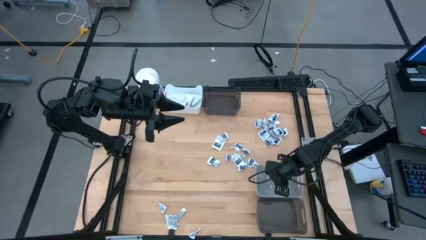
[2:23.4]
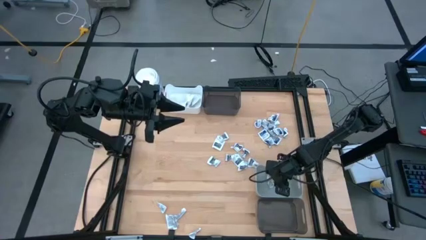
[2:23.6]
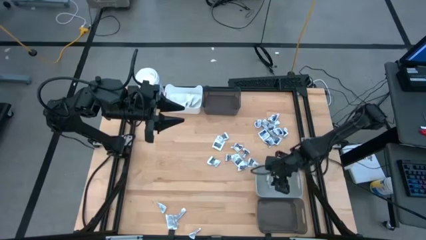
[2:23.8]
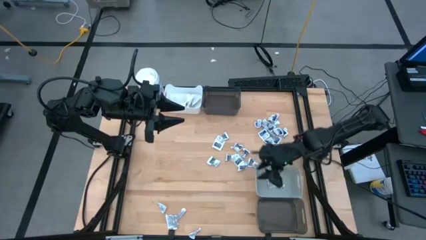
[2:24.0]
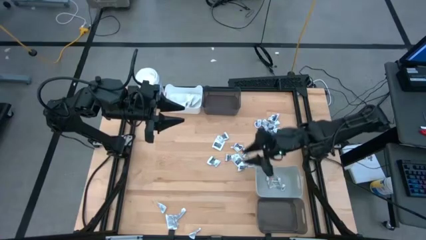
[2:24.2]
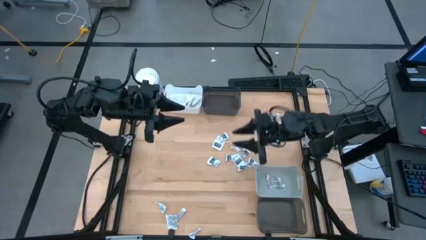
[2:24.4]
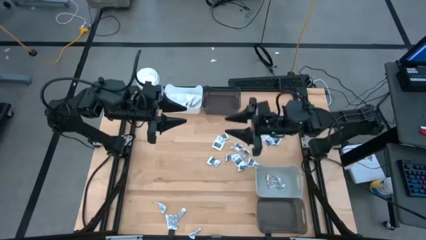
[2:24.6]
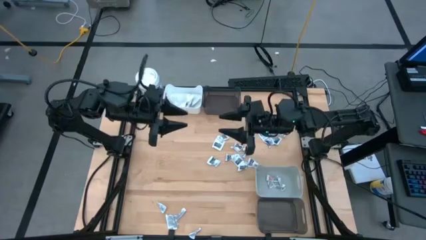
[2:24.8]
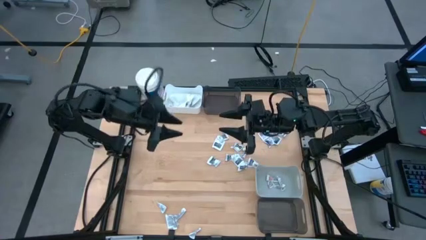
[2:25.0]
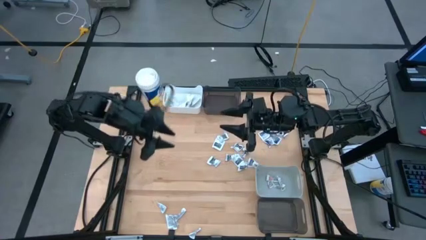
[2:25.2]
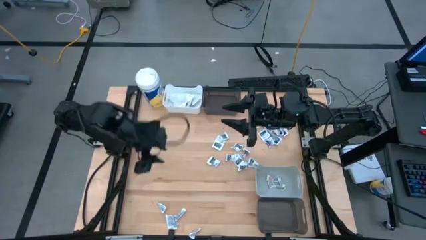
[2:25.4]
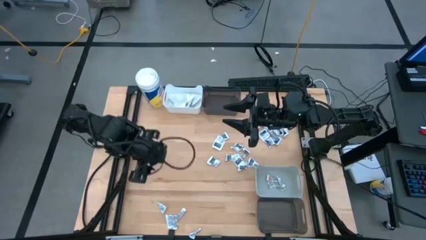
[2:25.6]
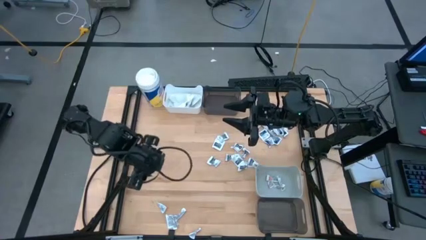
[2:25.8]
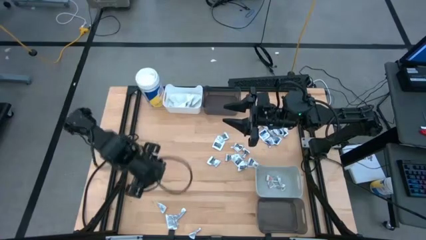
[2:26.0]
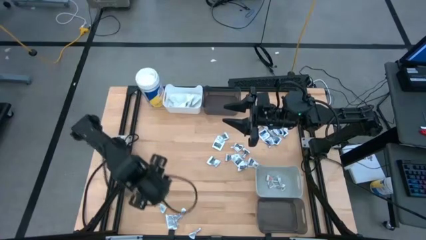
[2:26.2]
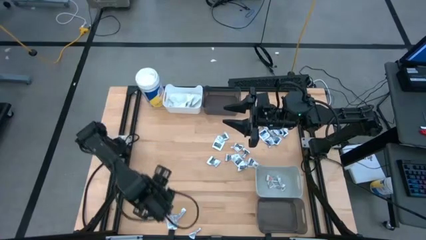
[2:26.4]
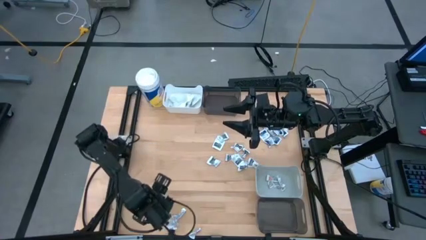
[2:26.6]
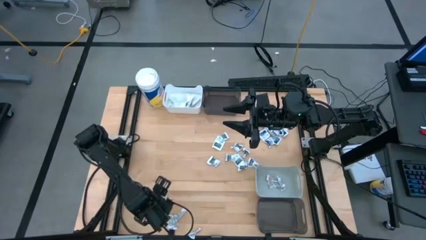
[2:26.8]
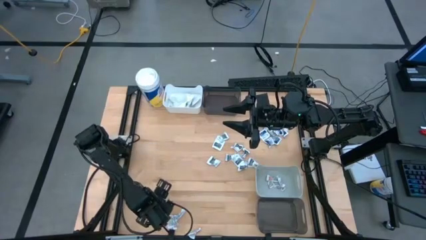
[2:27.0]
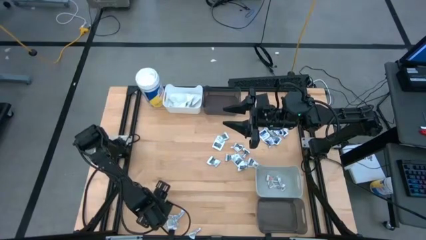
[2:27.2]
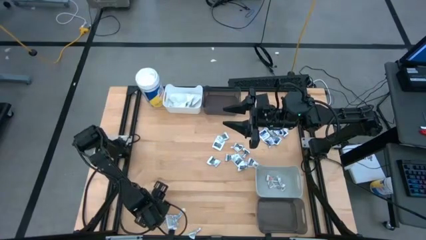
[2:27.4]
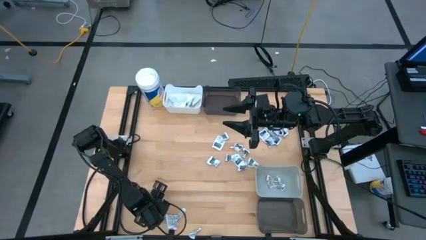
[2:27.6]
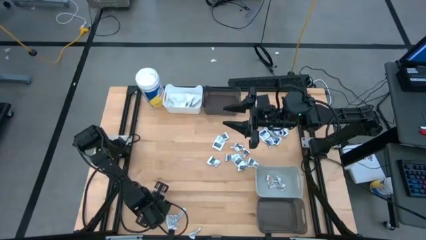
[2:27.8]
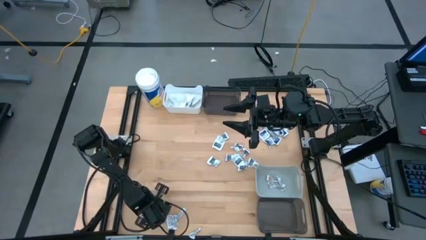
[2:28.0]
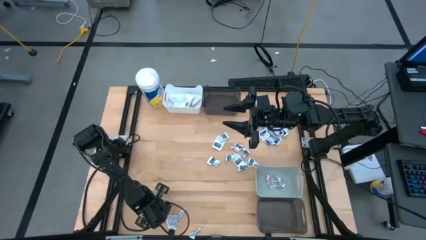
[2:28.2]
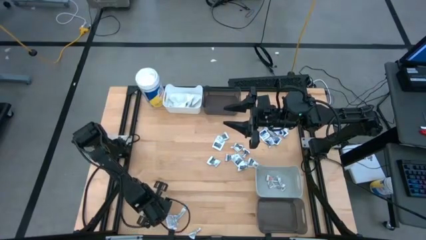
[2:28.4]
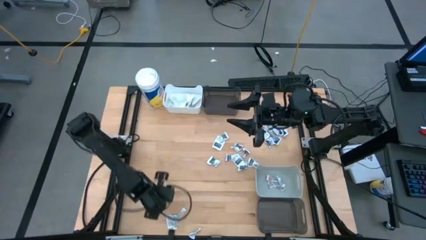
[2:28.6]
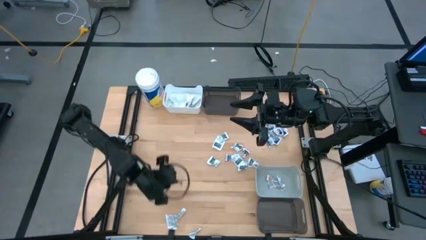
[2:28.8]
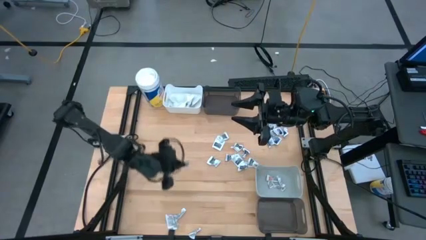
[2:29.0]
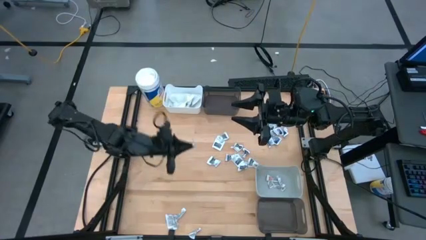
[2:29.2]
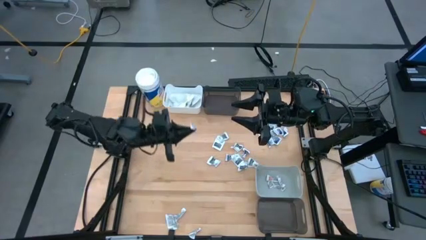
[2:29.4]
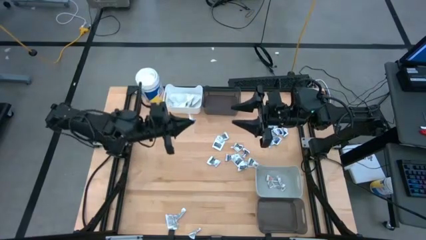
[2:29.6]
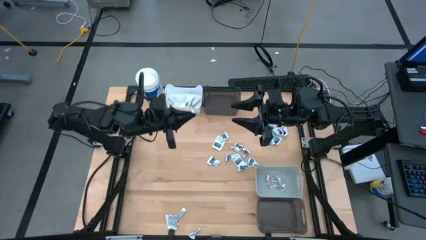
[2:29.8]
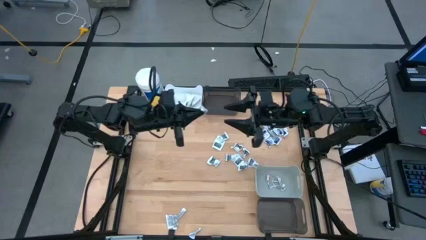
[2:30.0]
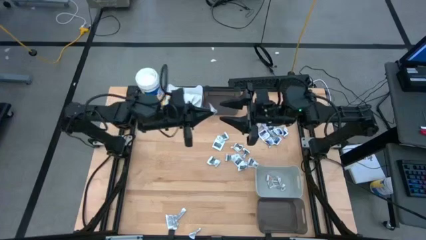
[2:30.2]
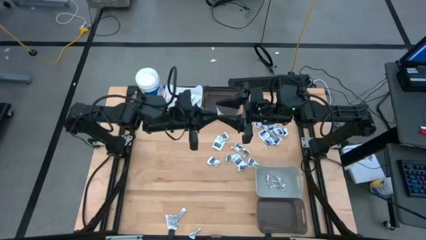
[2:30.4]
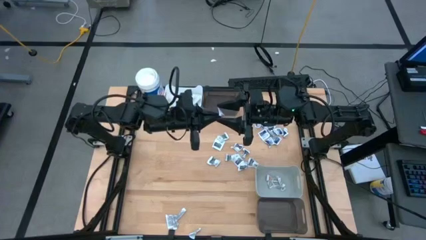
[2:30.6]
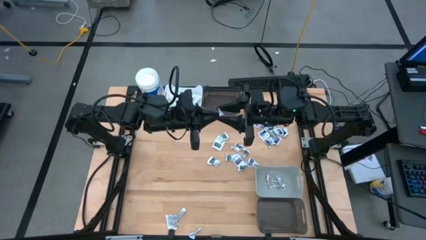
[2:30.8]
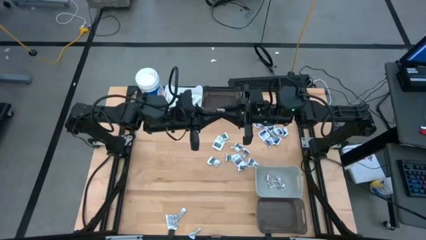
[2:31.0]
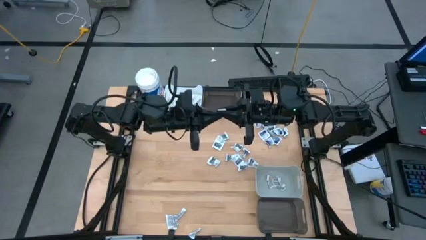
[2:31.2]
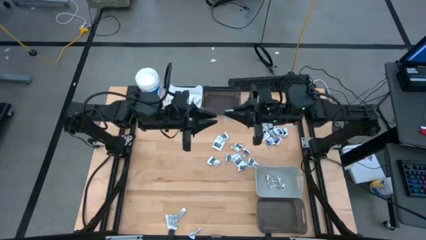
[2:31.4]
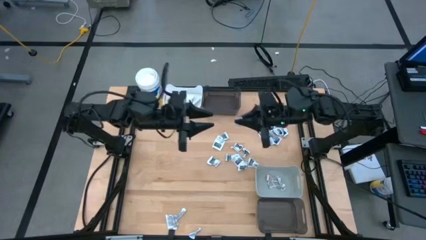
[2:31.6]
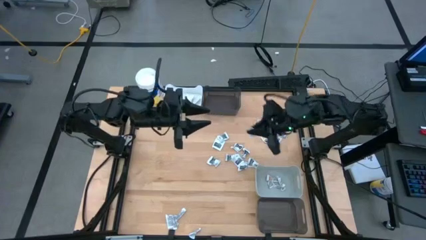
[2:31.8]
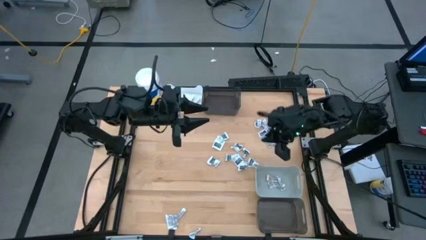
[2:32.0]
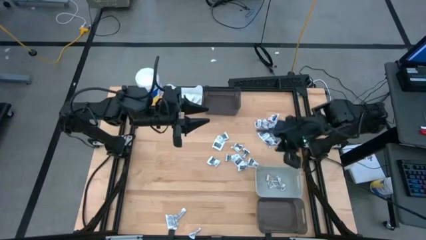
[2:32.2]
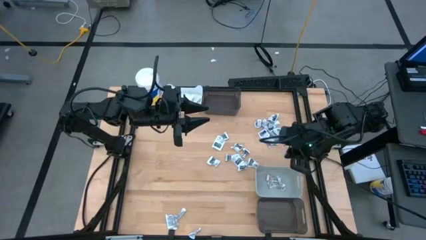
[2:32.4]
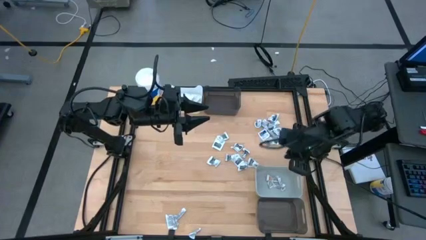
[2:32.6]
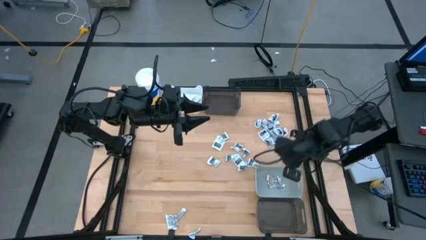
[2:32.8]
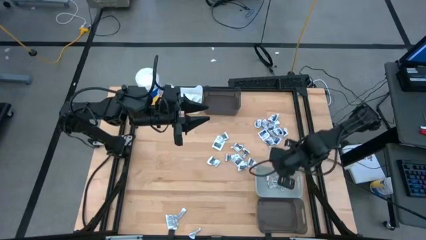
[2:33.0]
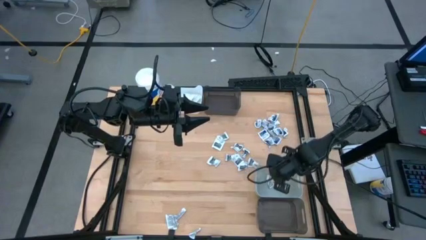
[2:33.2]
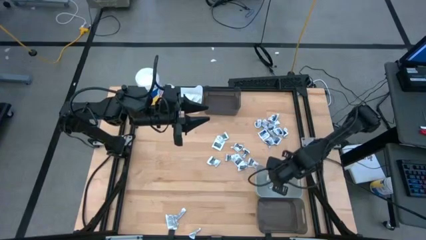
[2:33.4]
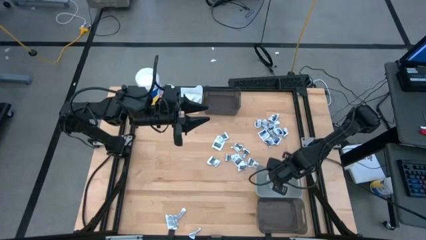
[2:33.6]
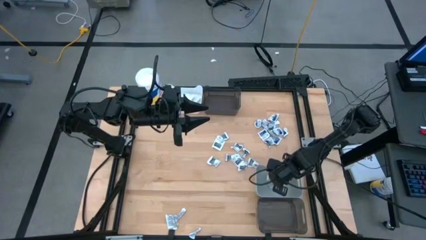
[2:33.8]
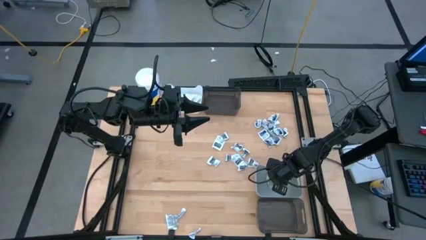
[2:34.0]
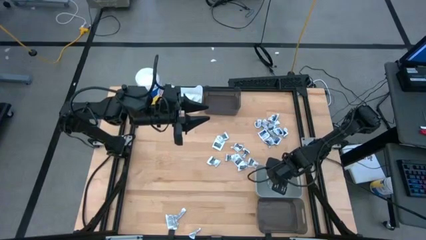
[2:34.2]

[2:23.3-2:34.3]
Task: Pick & Place First Aid Supplies
Put the orange ointment pack into the gray bin

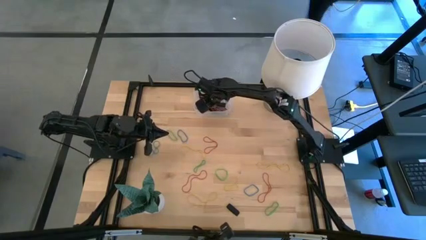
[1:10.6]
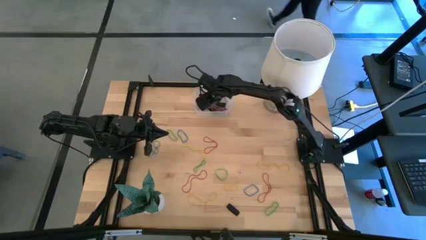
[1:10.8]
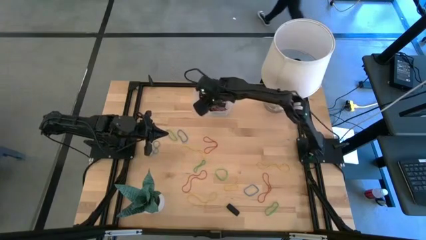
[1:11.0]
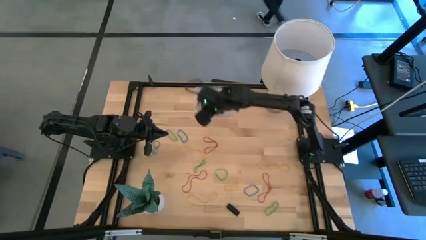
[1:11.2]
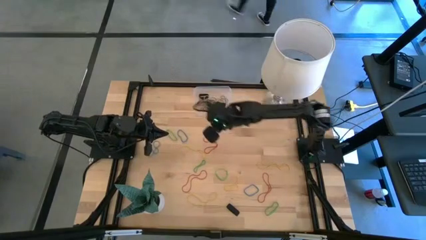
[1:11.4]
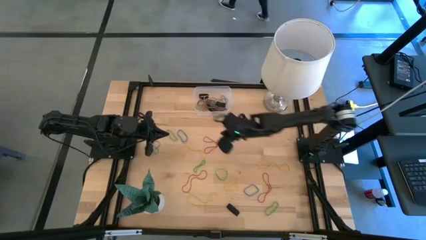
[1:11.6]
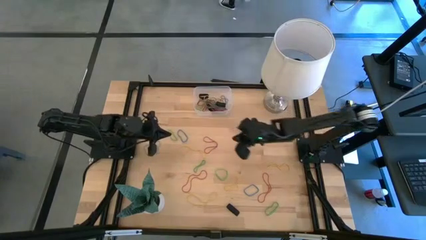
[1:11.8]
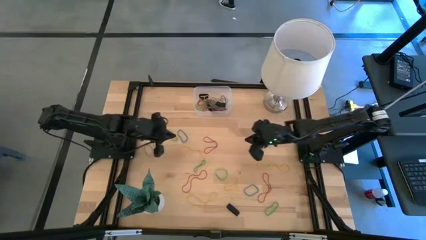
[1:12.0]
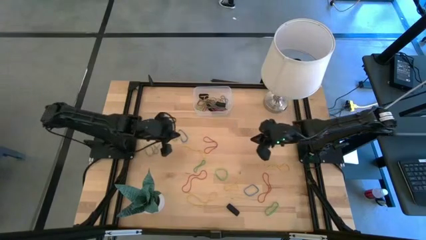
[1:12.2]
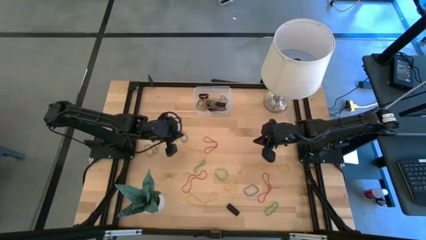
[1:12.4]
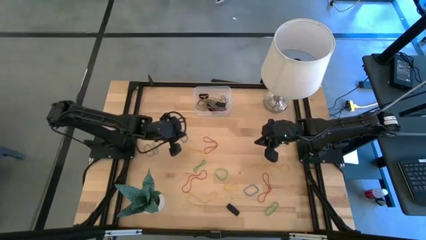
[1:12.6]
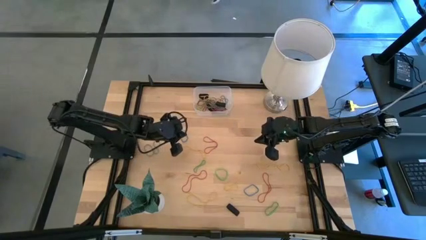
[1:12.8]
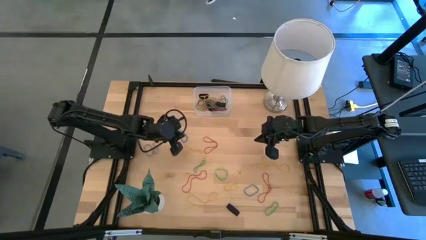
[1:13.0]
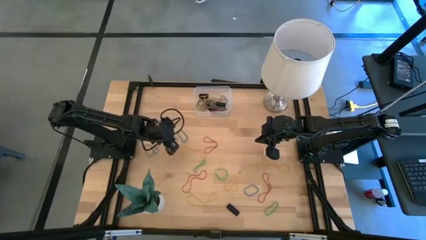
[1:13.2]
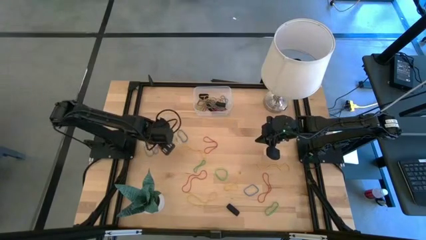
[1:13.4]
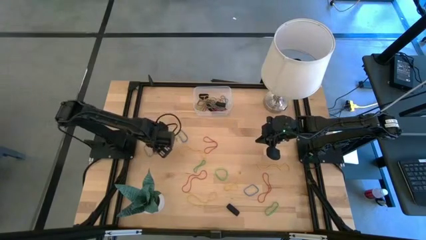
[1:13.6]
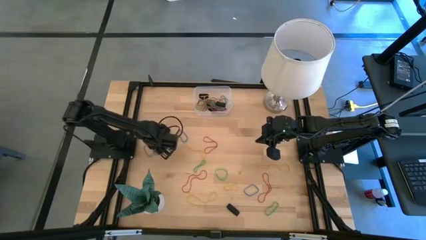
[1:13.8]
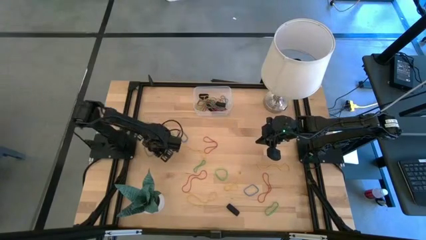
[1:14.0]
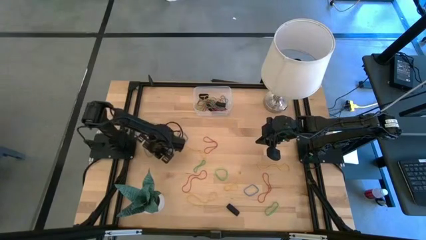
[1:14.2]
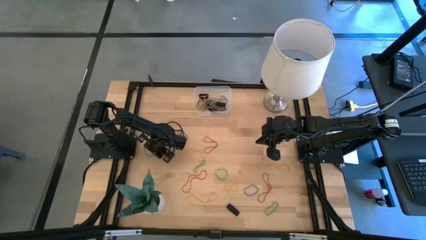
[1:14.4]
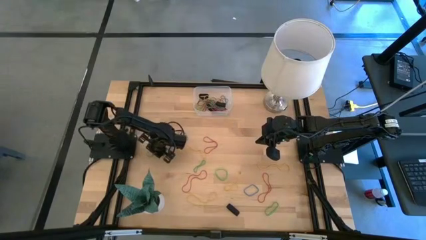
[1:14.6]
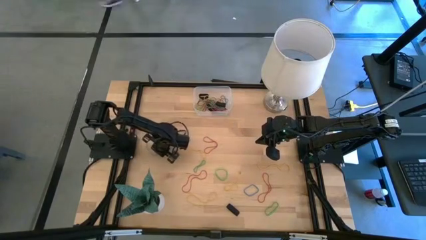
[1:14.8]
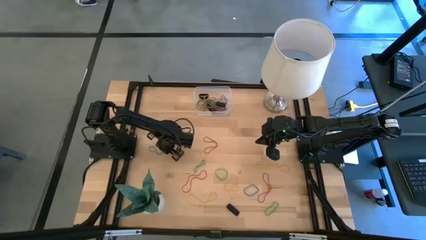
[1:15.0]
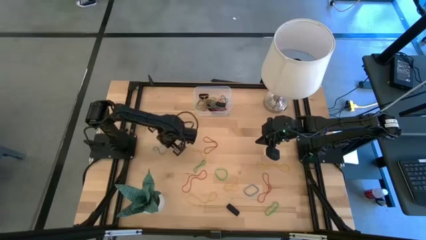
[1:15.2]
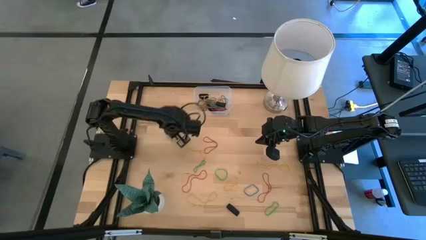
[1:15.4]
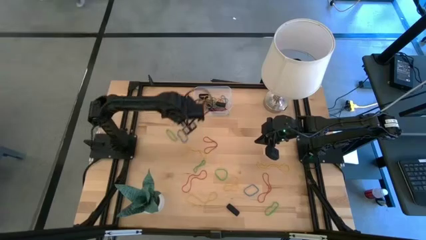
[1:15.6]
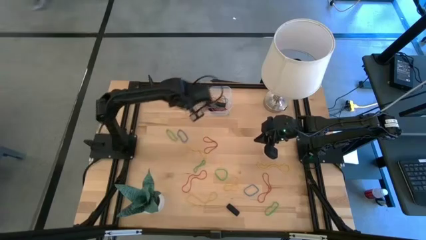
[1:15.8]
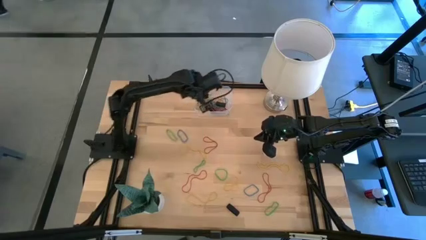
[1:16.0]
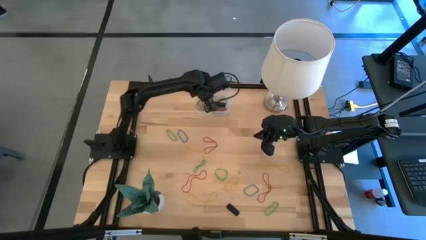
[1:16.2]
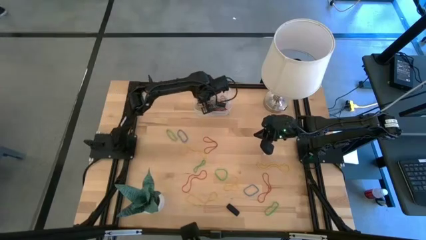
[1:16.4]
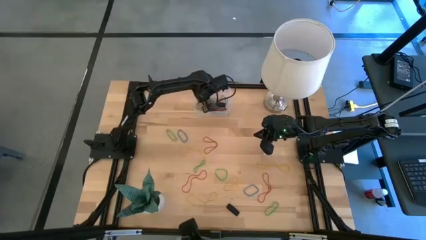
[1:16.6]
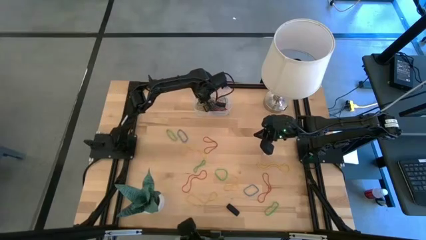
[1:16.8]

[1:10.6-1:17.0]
Task: Pick and place rubber bands into bin
Put the blue rubber band into the transparent bin
